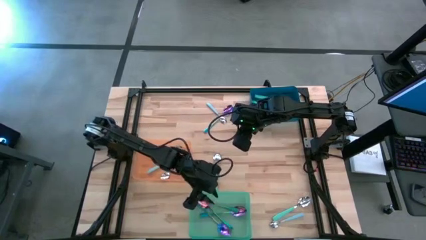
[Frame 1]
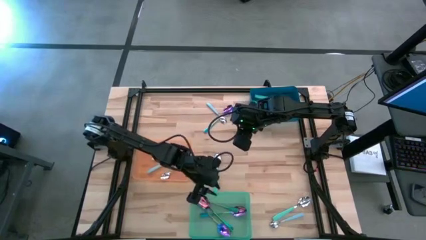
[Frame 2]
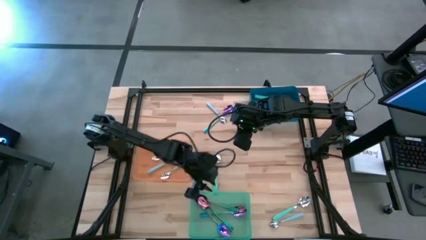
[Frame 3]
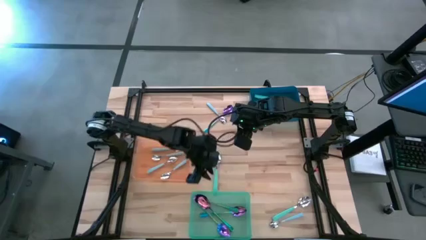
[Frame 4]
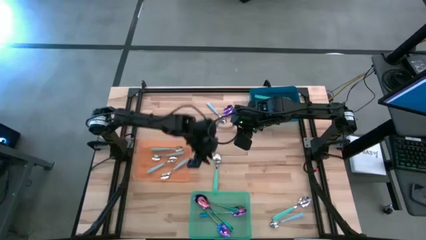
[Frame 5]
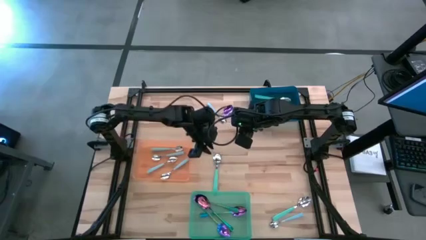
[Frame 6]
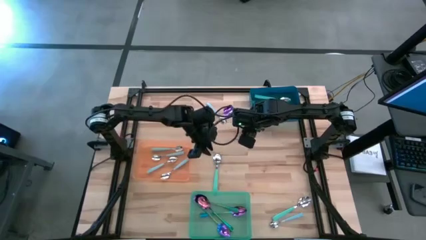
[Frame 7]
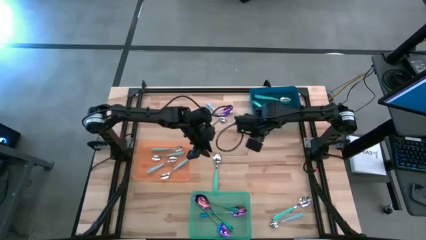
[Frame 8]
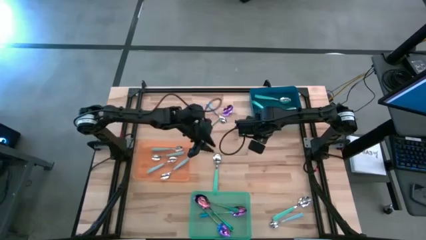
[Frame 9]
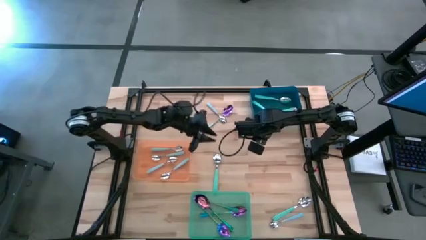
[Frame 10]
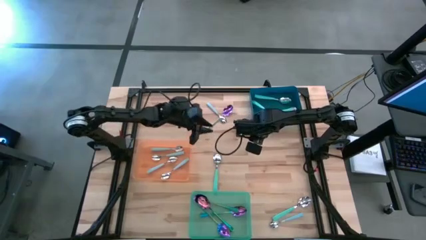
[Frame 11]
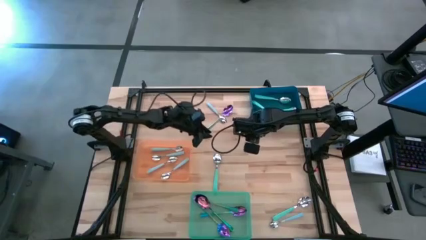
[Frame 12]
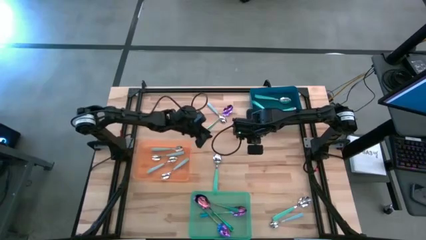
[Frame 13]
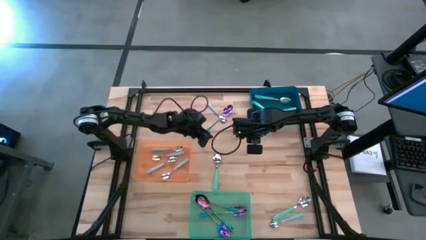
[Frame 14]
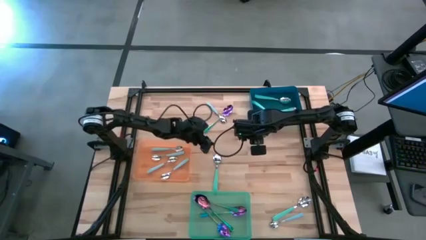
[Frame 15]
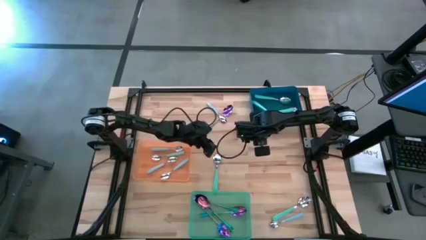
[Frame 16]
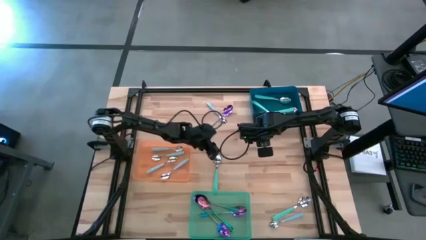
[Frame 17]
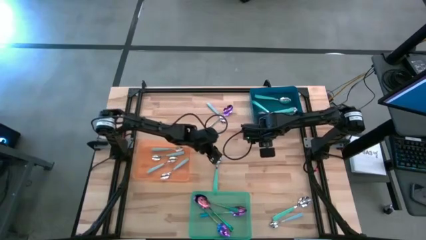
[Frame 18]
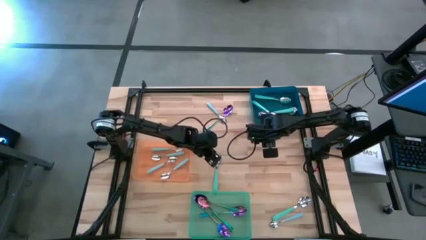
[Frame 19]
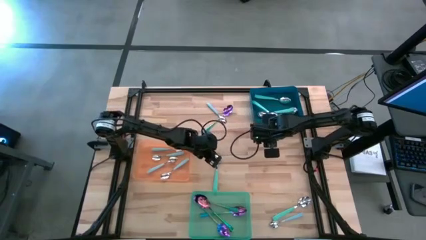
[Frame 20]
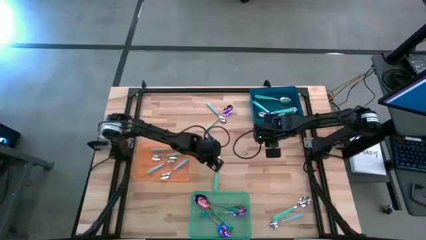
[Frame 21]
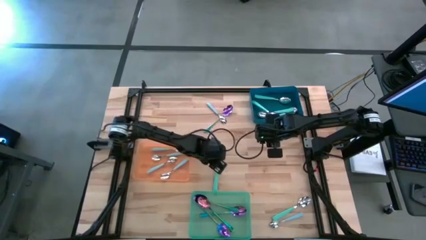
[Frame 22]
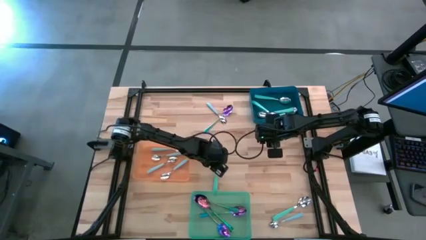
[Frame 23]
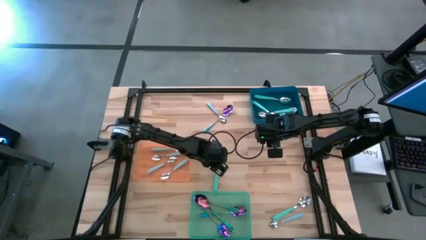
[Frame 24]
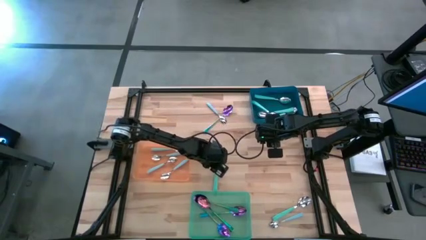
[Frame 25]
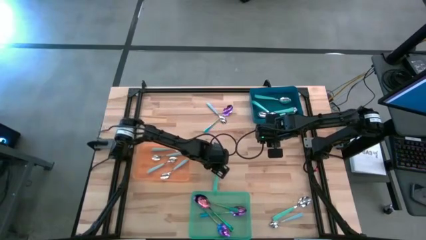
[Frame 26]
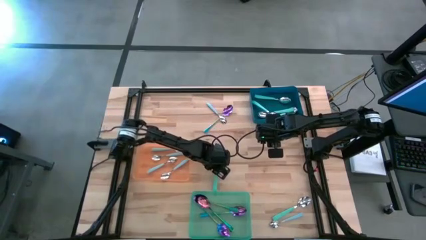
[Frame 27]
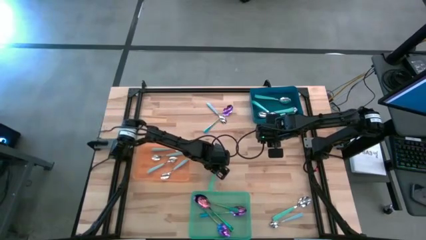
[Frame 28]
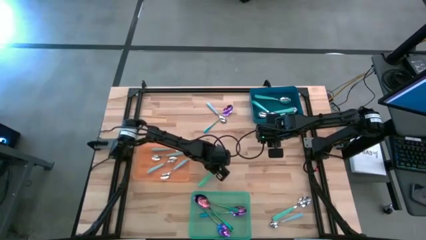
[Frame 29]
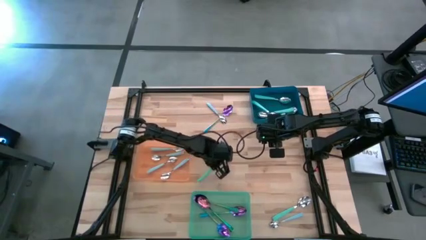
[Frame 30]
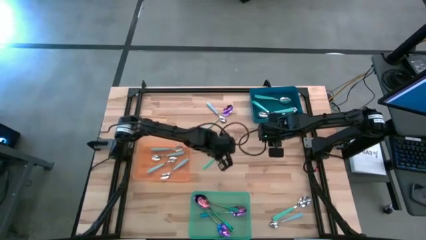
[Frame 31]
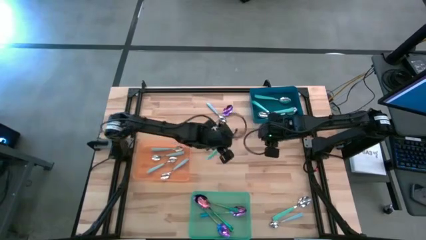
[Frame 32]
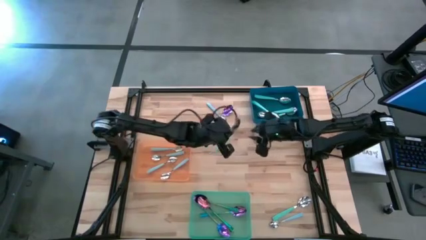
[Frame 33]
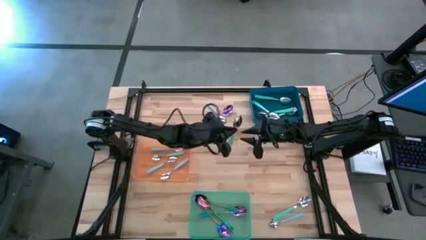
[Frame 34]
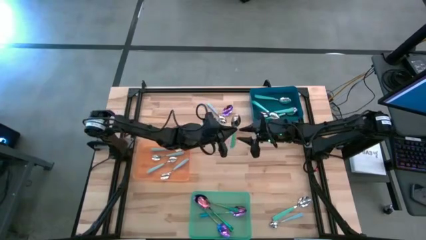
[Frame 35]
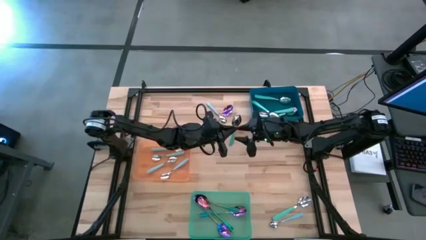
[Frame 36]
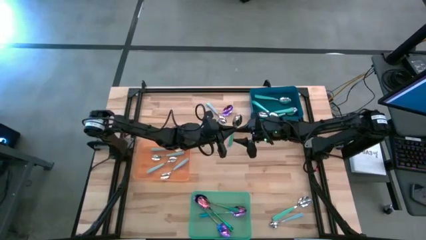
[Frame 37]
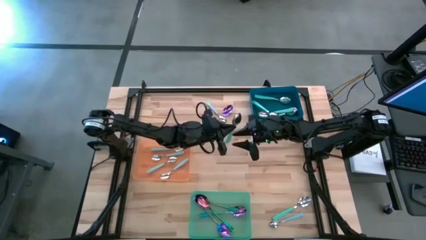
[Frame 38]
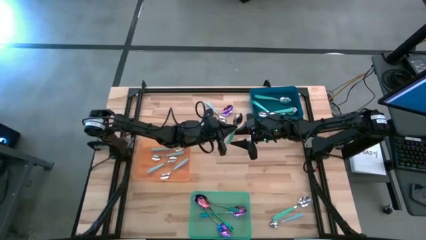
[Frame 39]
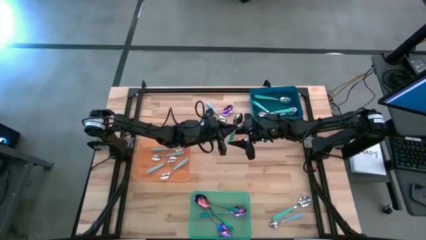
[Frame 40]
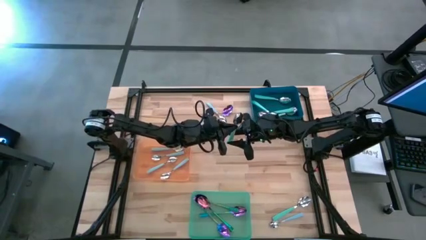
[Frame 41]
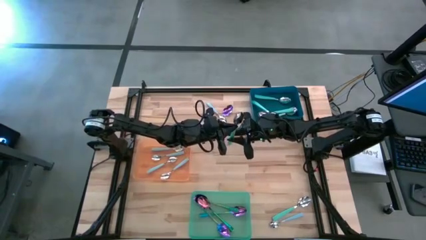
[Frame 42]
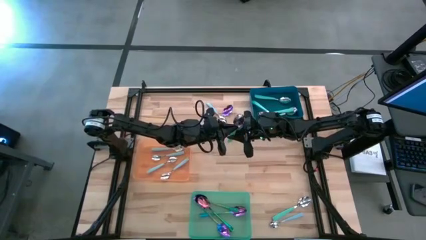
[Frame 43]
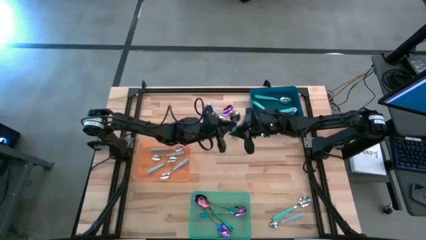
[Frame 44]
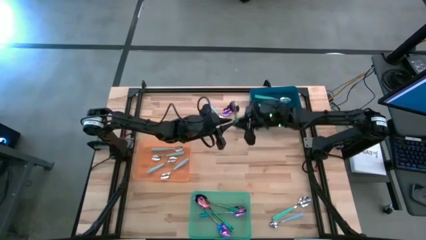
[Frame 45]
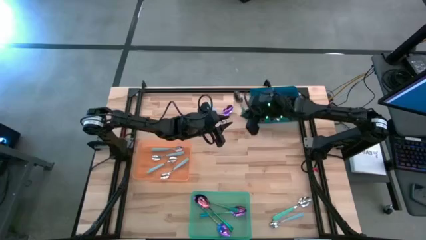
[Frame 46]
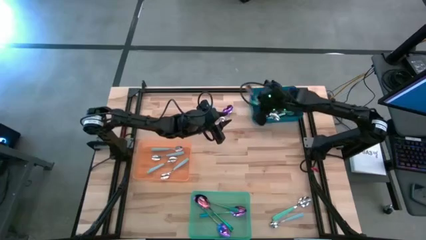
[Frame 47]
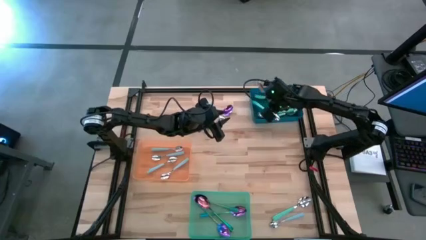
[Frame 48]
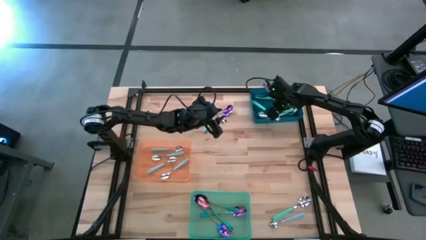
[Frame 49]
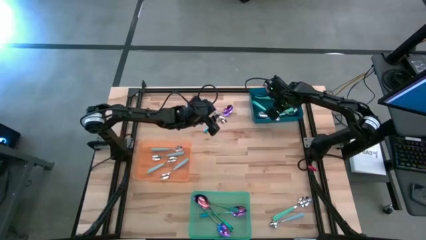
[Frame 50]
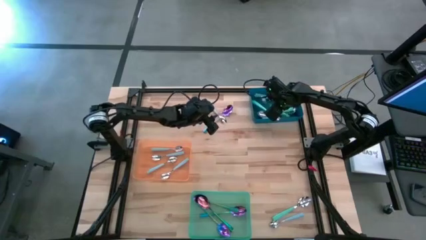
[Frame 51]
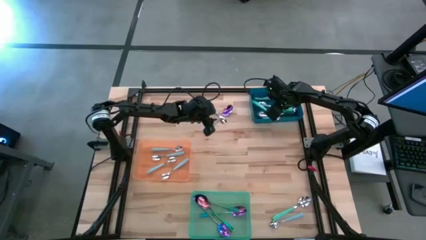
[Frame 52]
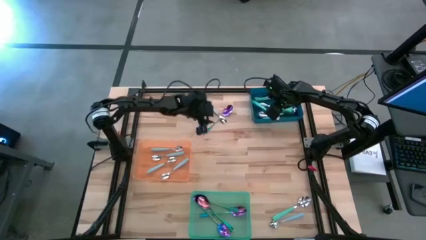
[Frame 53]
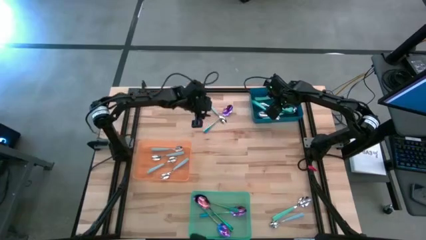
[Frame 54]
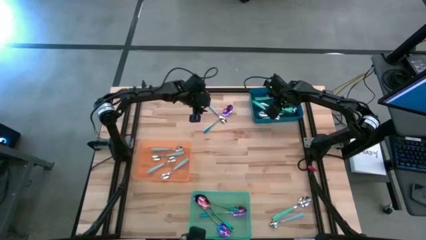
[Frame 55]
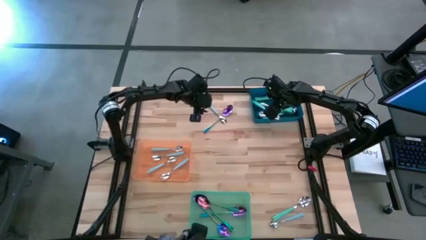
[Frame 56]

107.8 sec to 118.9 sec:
Task: Sort silverware by color (type)
Put the top green spoon into the blue bin

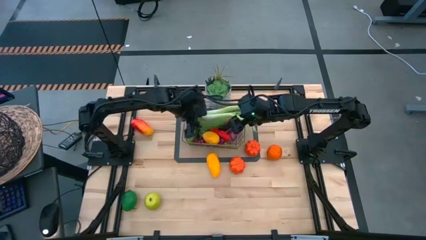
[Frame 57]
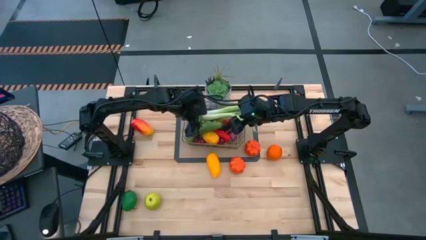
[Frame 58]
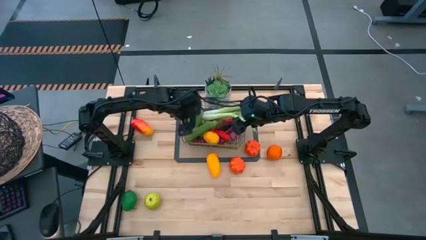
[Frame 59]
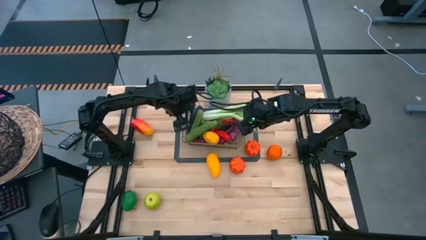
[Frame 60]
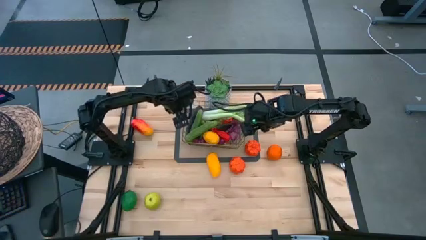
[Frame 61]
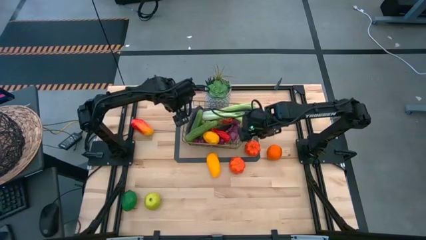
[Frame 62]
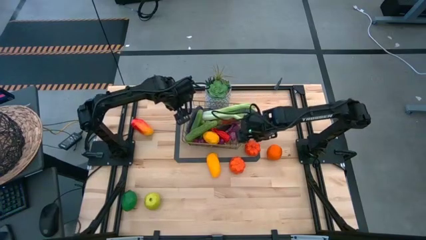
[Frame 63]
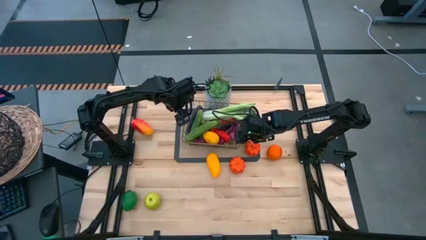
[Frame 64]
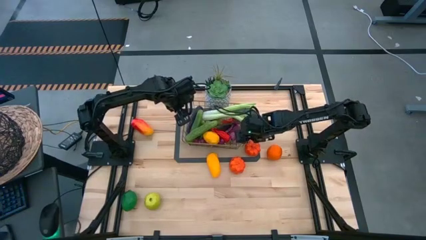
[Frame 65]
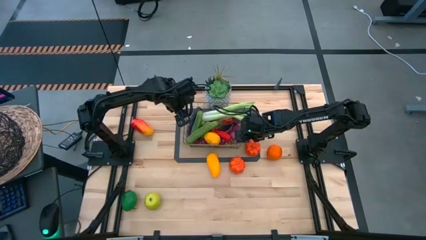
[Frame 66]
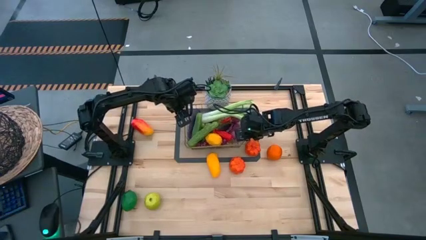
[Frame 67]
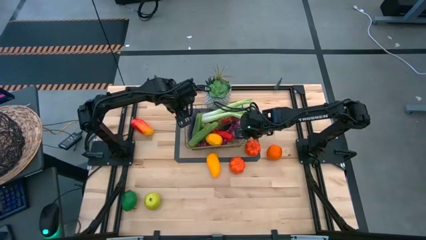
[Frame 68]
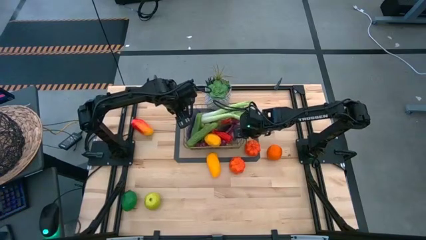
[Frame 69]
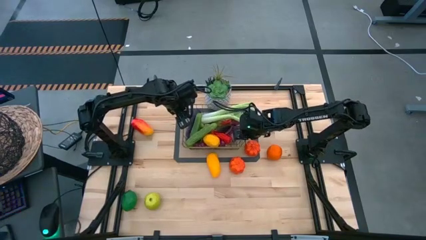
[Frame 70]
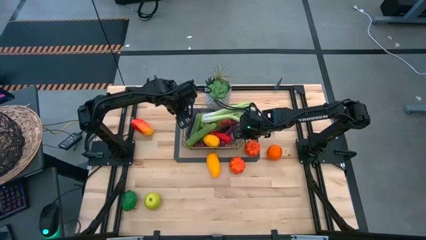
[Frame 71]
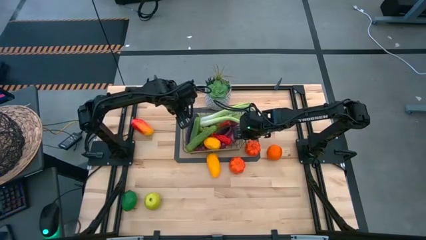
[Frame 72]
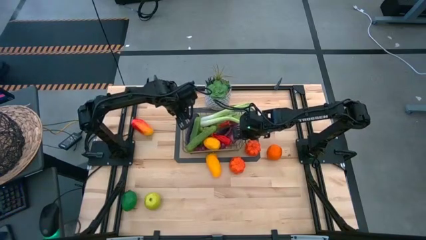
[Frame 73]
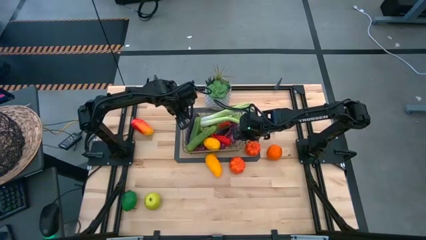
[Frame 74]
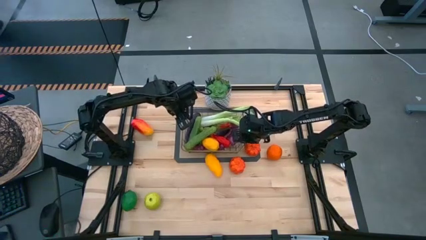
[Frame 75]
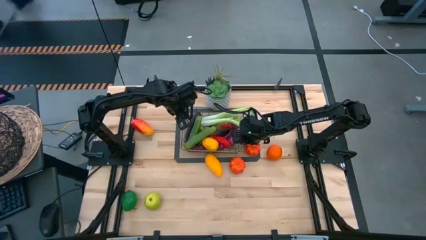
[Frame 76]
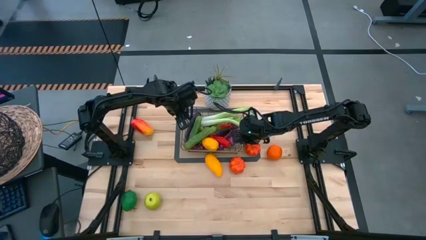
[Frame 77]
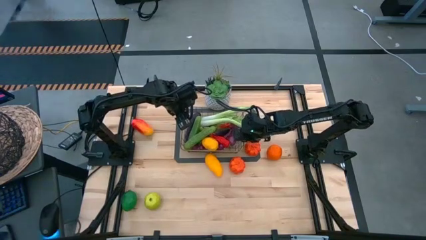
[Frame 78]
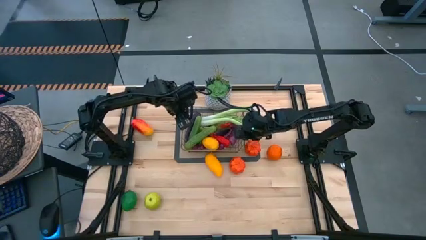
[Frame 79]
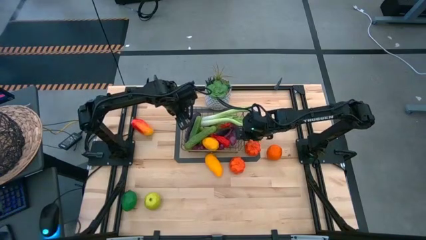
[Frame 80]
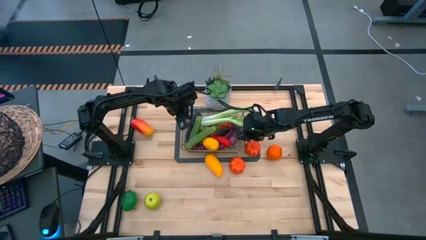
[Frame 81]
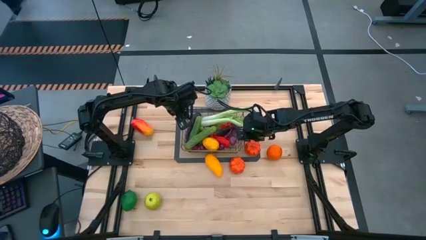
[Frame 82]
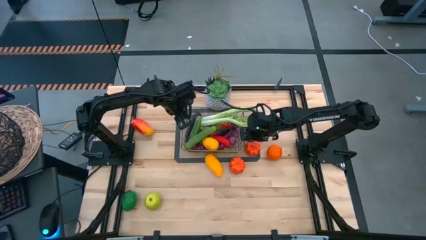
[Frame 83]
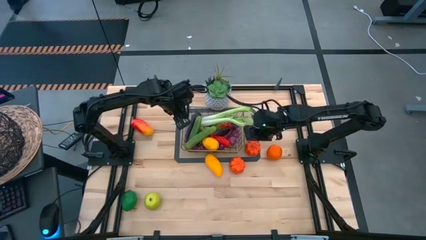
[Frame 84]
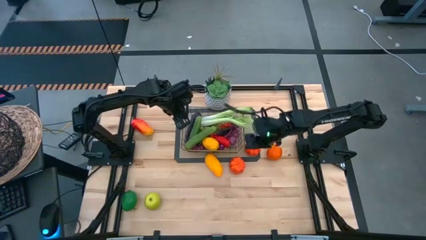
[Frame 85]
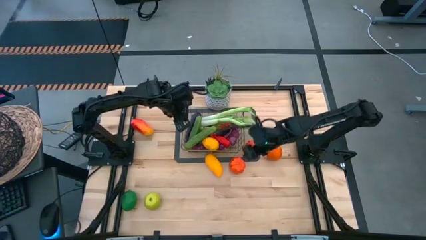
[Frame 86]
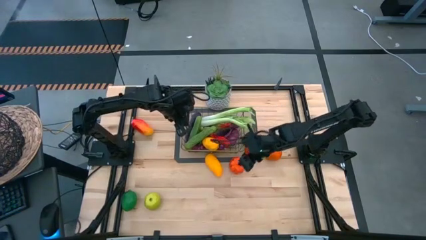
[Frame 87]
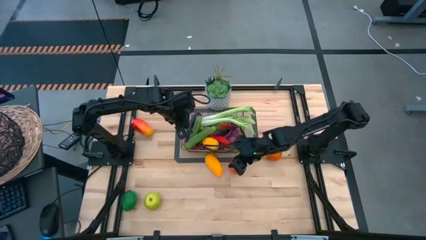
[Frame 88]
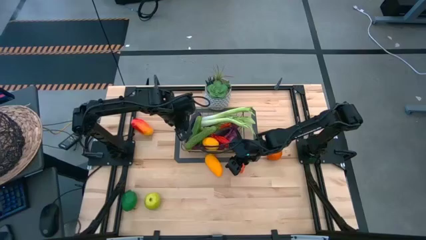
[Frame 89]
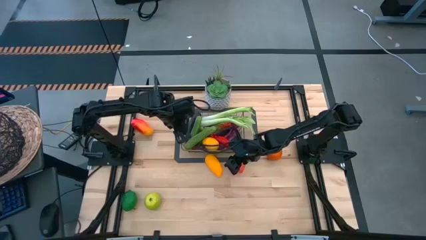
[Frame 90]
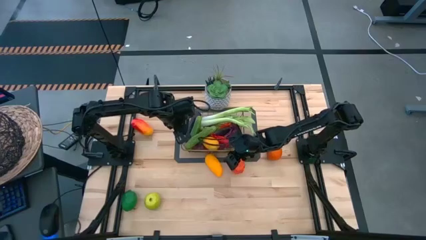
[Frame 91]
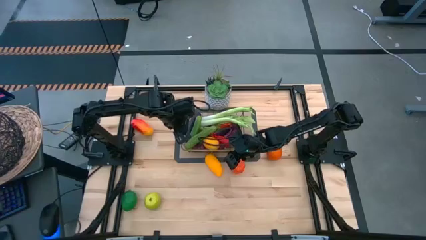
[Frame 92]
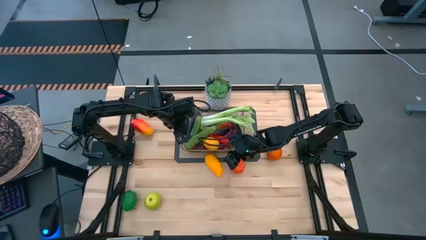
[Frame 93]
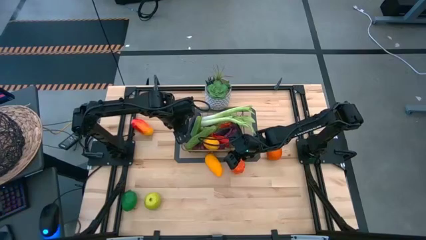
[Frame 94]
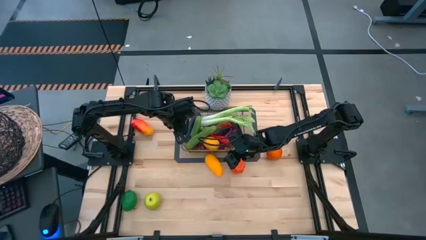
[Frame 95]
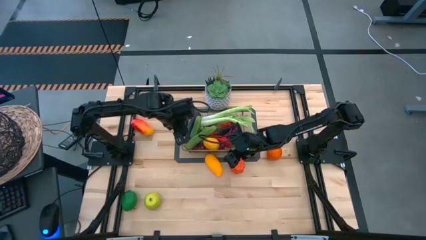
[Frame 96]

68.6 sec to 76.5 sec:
Task: Build produce basket
Adjust the basket
